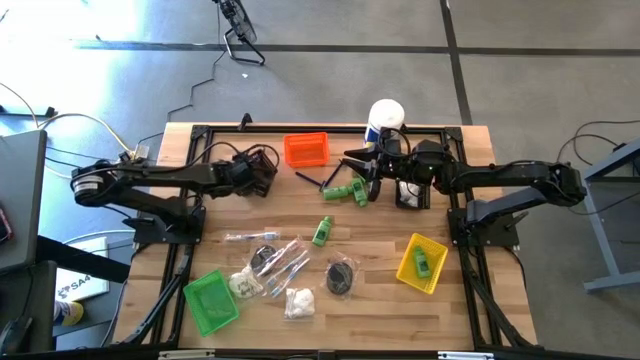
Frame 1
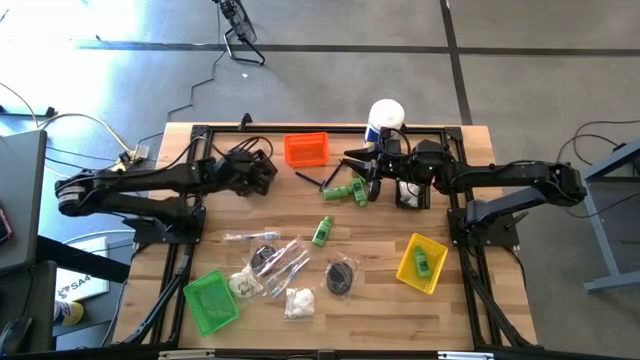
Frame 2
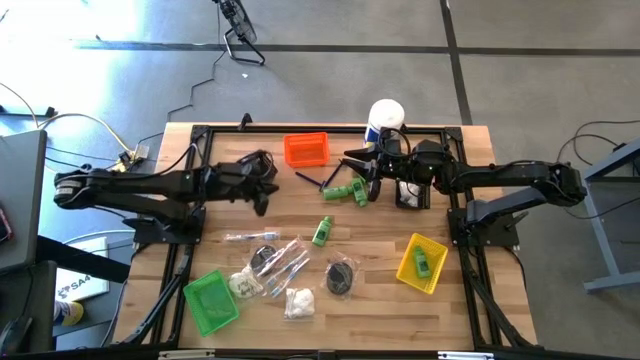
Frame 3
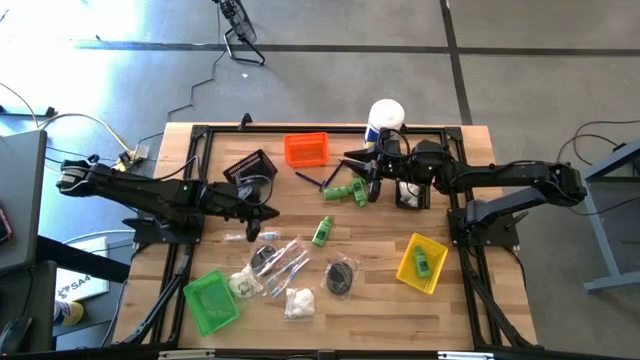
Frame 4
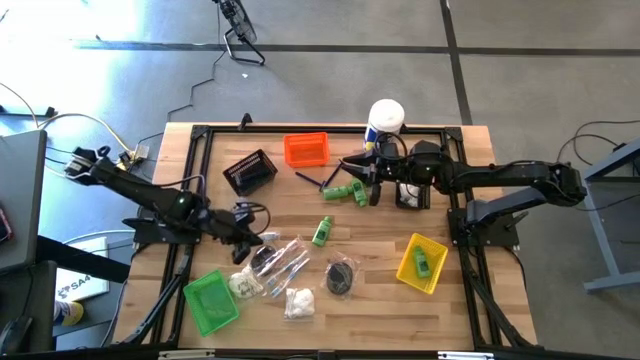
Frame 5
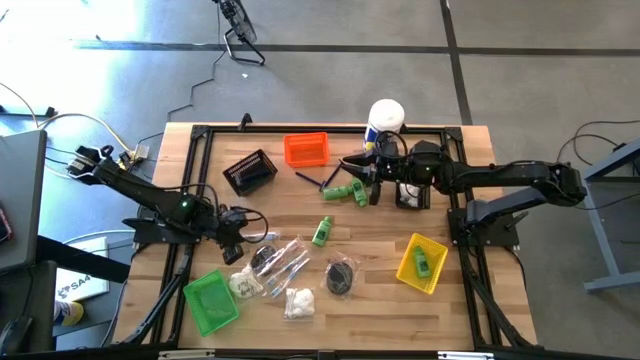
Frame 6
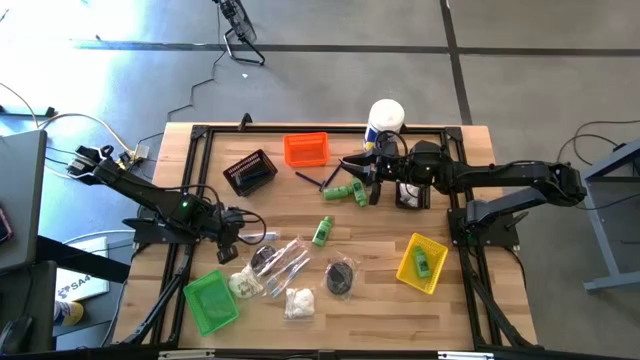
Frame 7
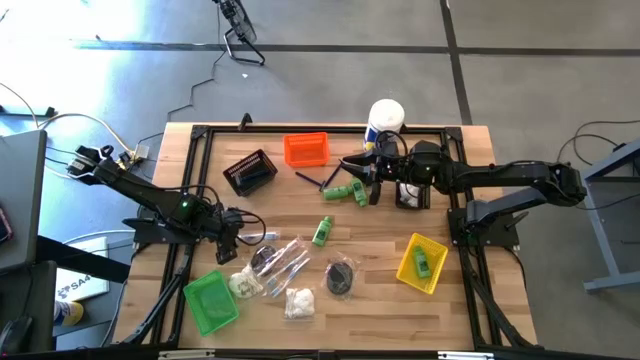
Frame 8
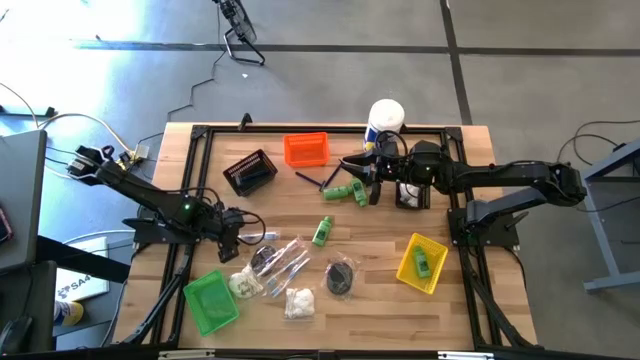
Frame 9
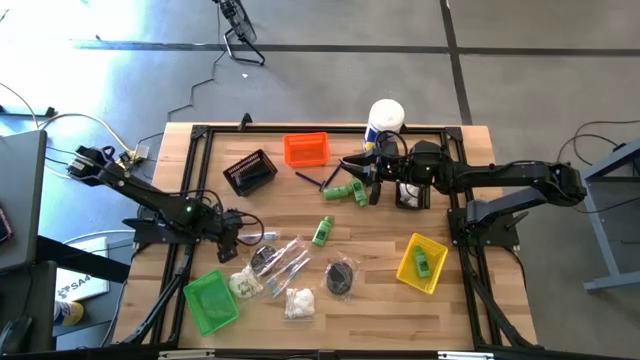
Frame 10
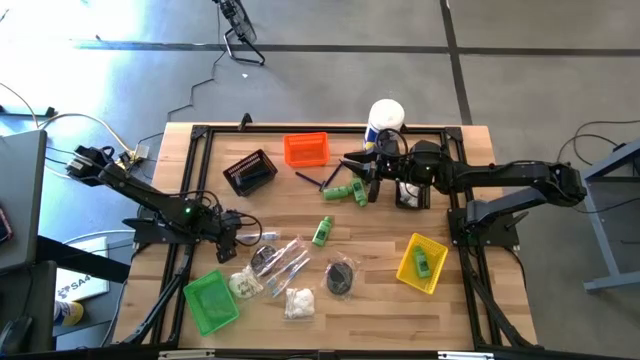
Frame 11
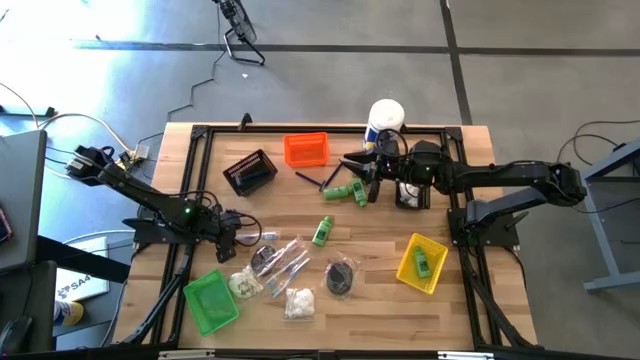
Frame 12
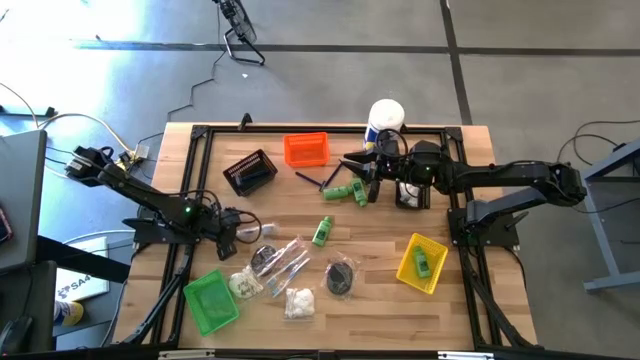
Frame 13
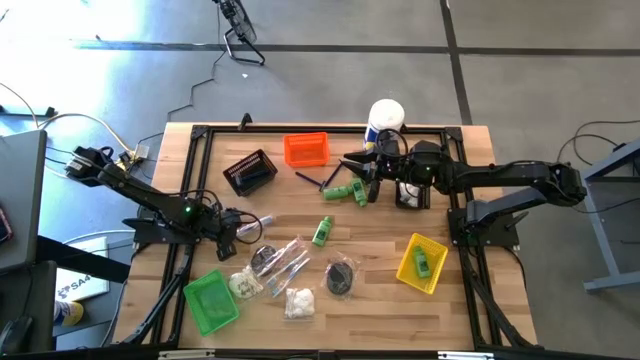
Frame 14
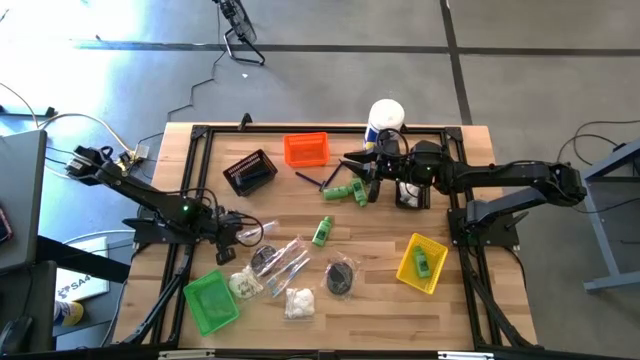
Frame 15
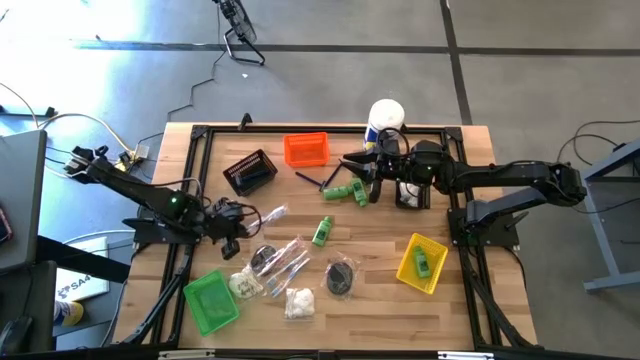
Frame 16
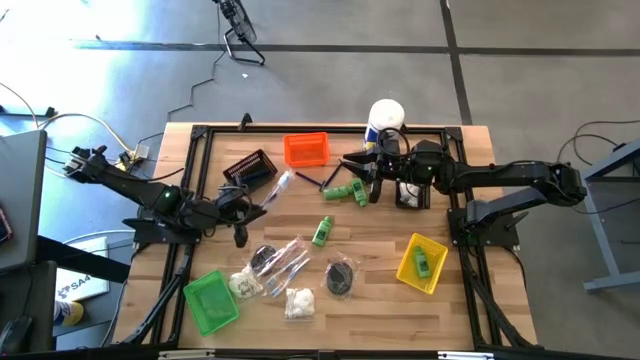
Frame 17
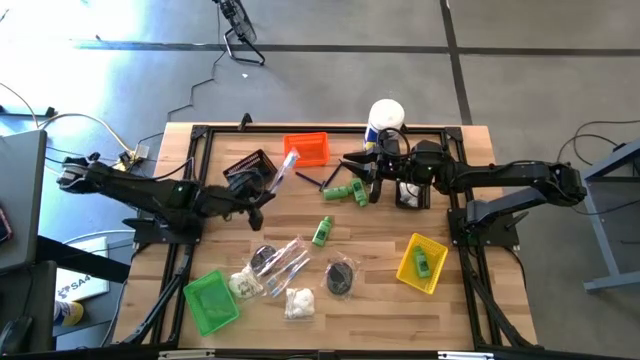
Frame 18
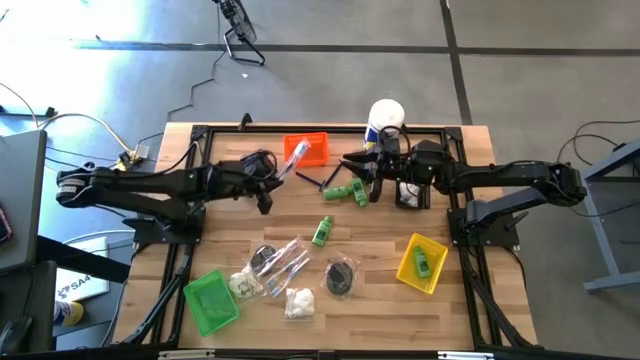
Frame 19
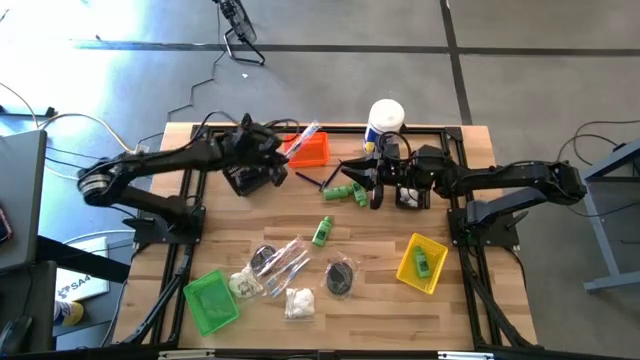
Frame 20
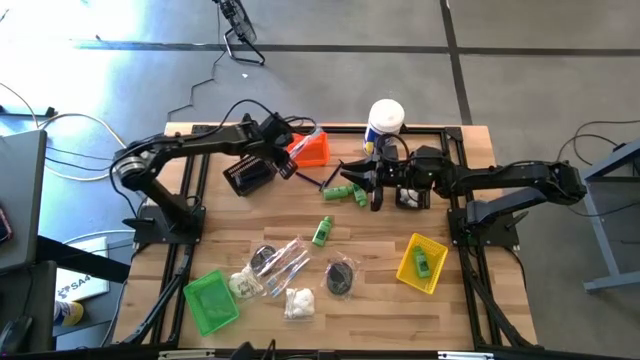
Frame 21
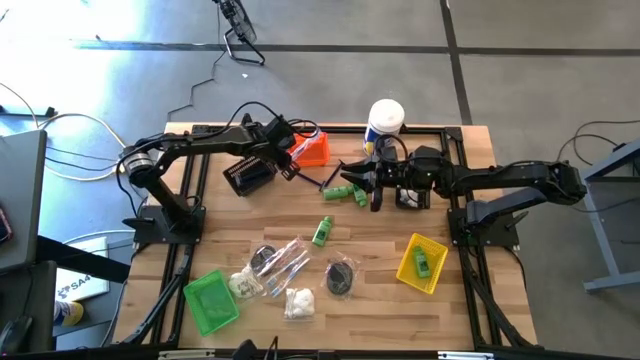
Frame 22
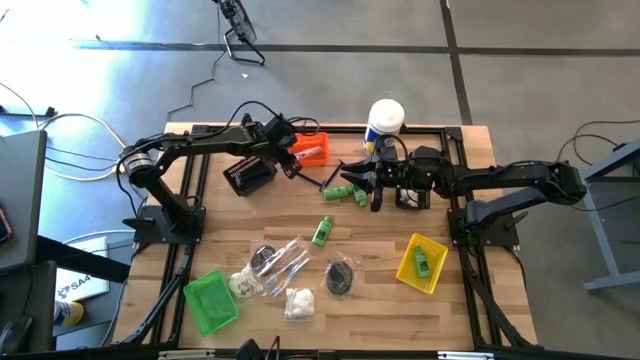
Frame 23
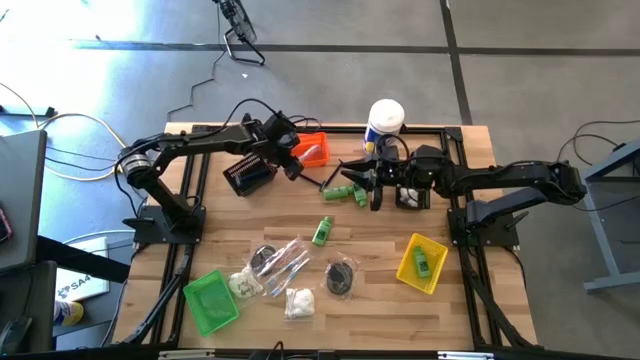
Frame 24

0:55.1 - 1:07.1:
Task: Pick & Place Travel size toiletries
Put the blue toothbrush into the orange bin

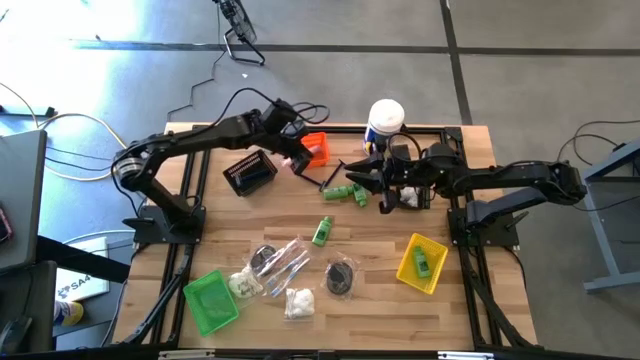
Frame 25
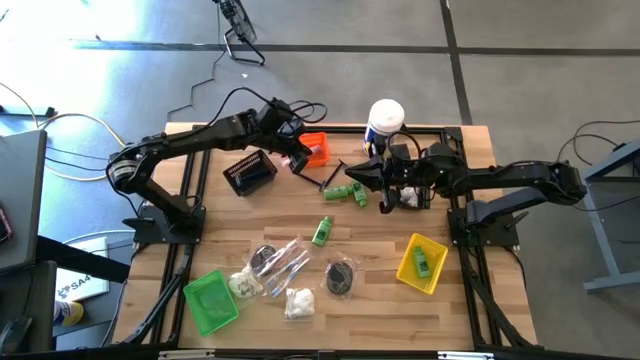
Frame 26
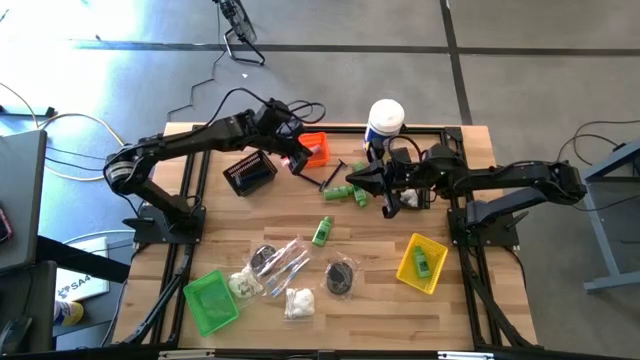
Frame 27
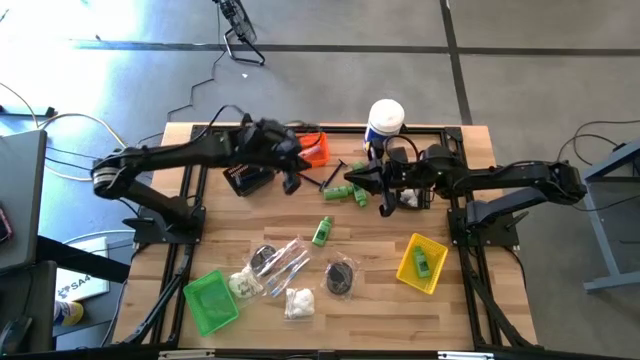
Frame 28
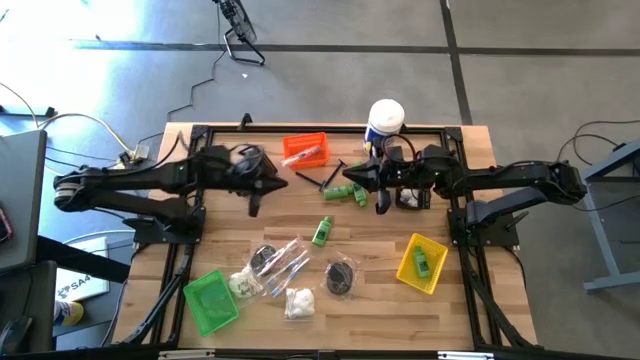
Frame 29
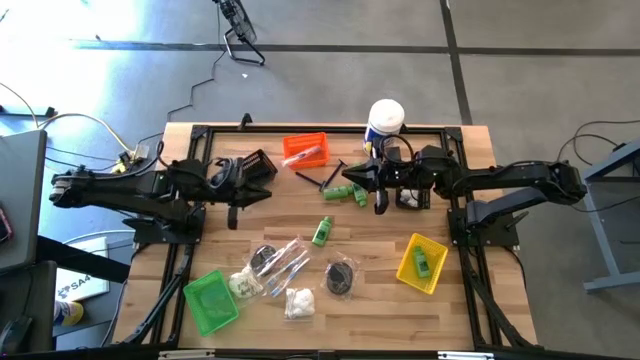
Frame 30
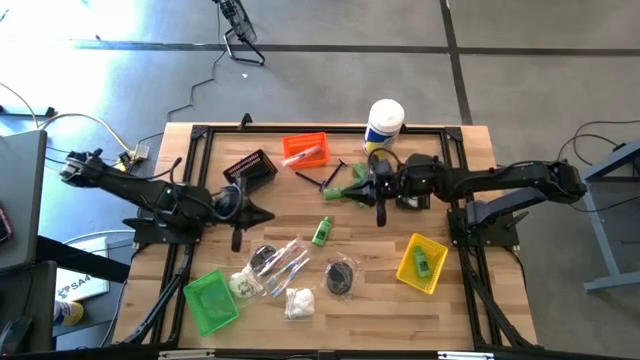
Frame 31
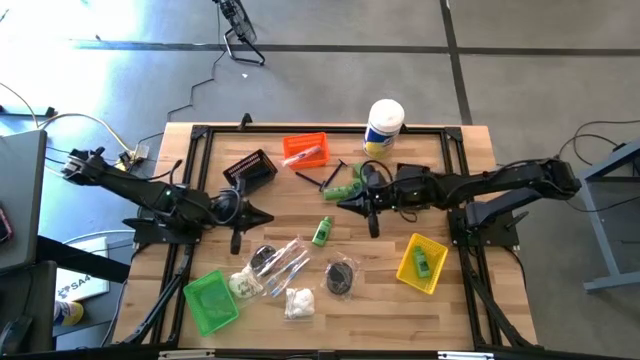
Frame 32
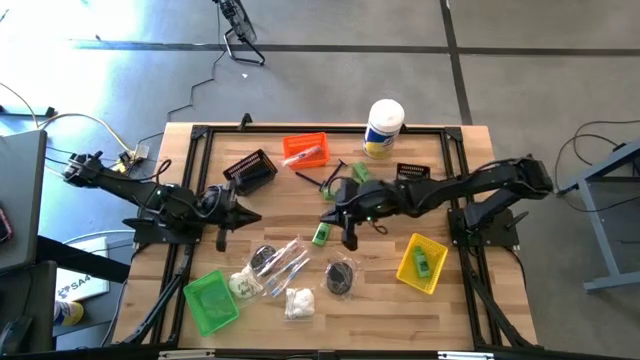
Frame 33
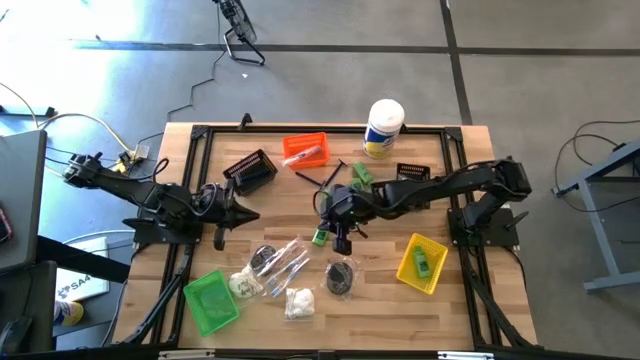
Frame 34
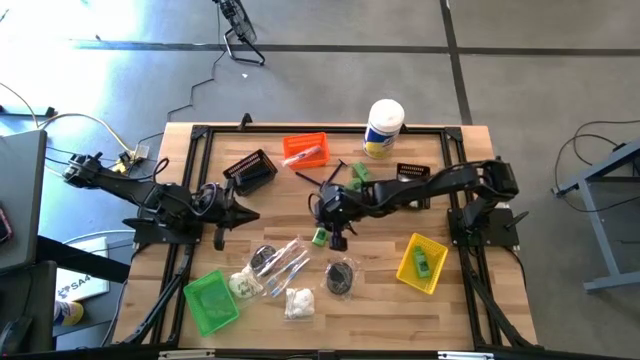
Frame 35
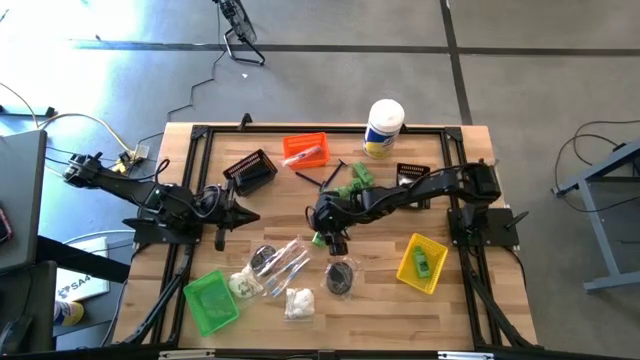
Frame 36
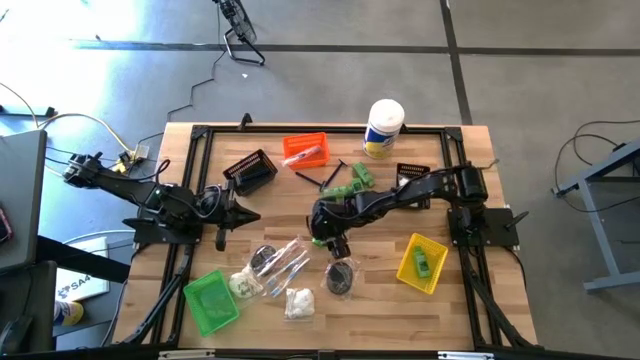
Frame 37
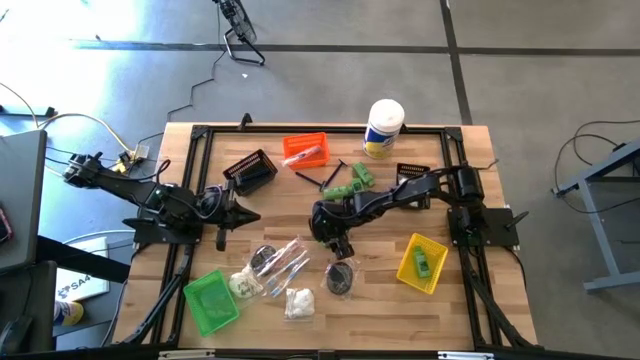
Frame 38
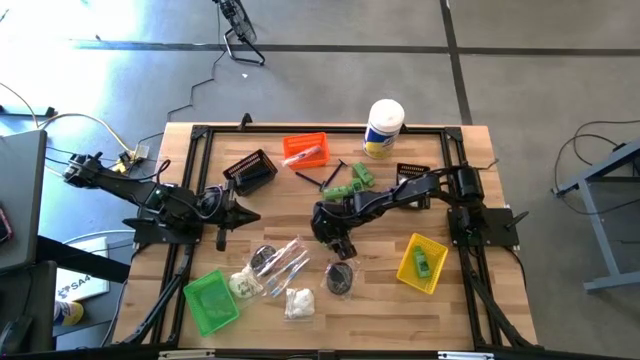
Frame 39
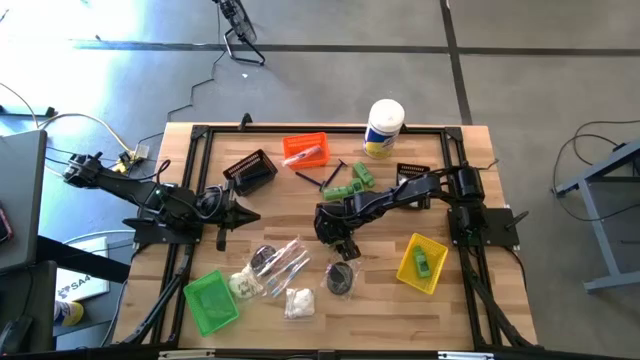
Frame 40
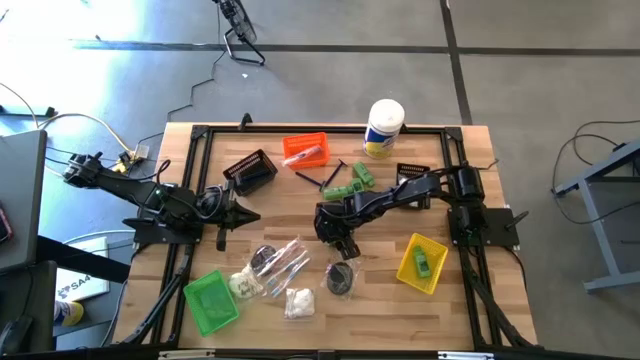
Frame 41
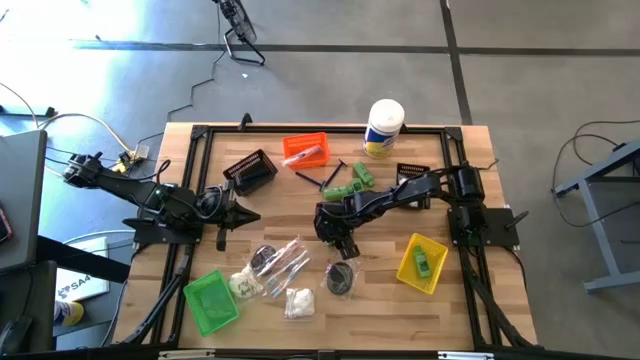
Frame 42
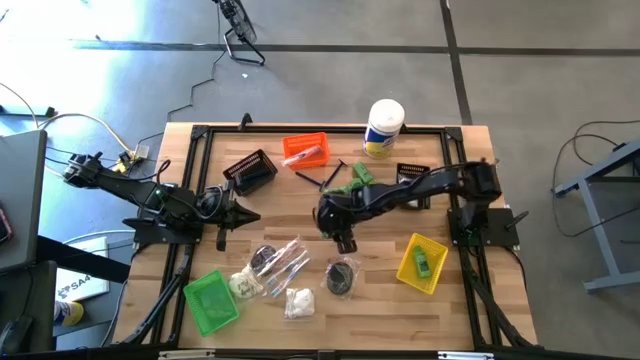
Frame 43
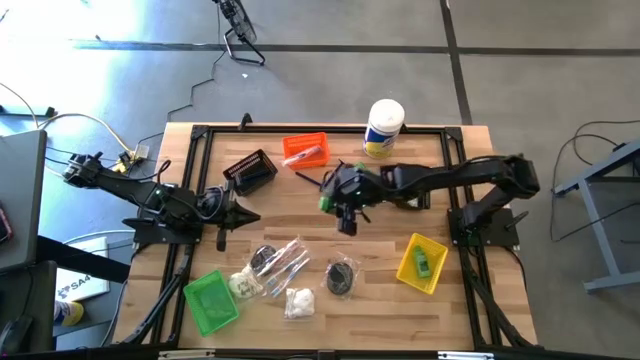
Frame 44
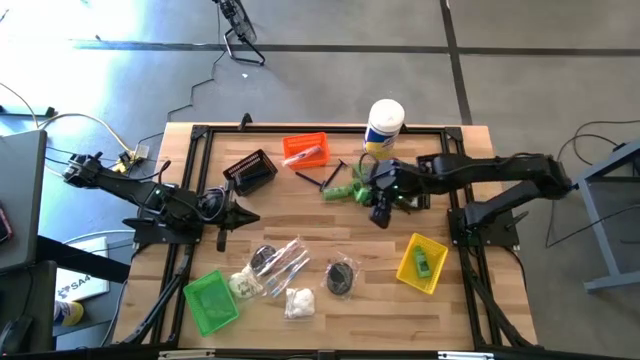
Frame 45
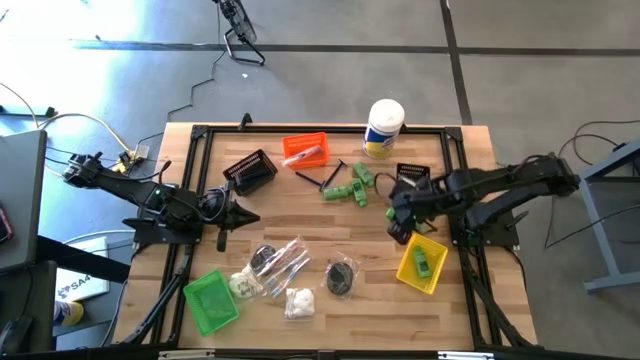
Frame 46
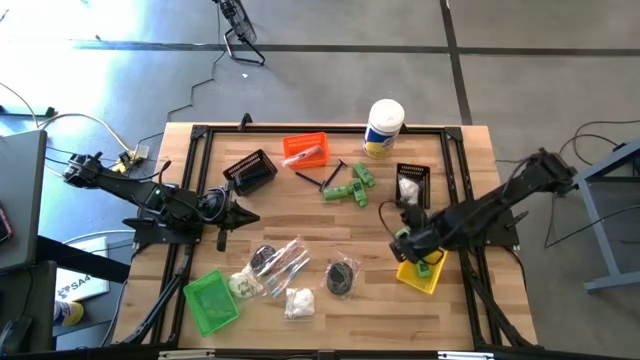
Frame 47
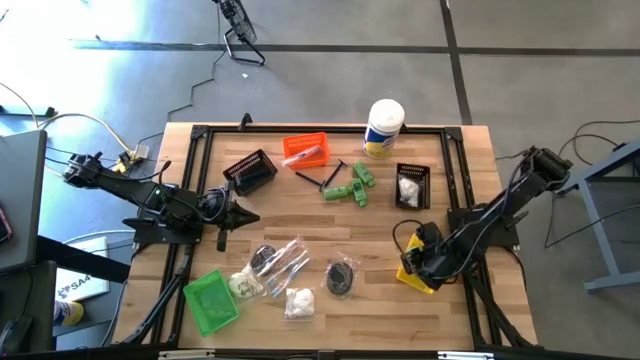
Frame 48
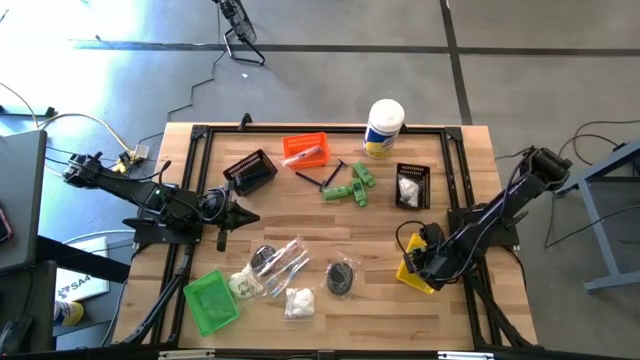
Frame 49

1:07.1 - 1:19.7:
Put the green shampoo bottle into the yellow bin
